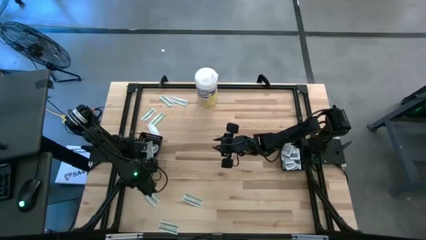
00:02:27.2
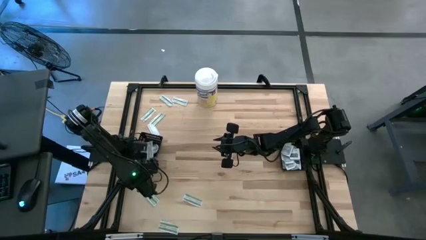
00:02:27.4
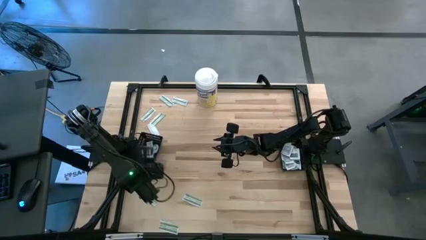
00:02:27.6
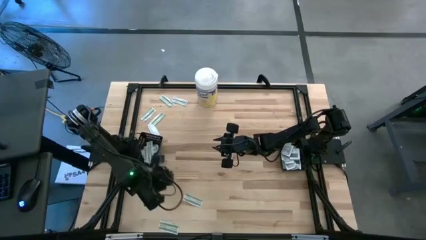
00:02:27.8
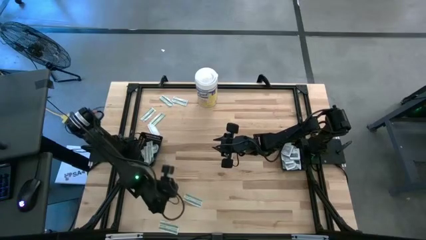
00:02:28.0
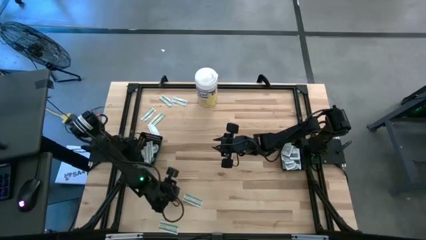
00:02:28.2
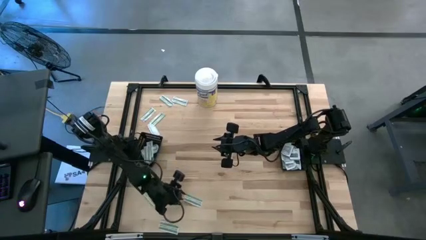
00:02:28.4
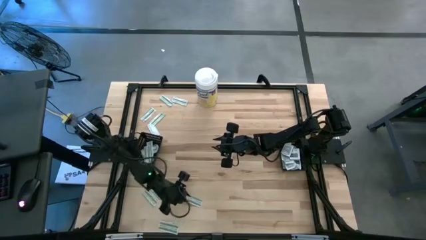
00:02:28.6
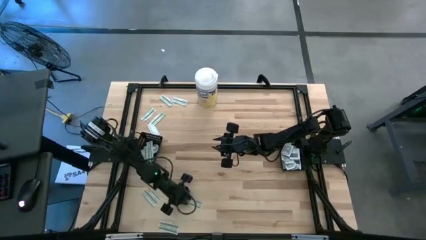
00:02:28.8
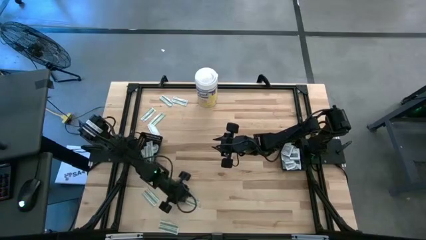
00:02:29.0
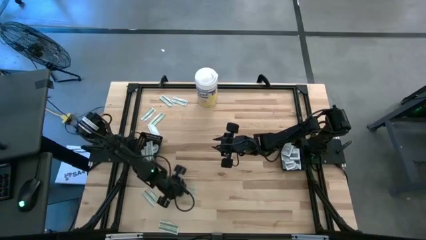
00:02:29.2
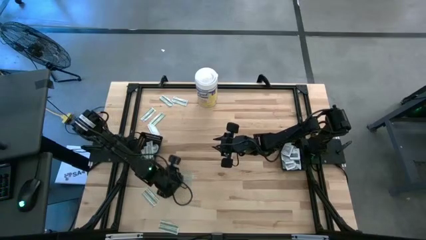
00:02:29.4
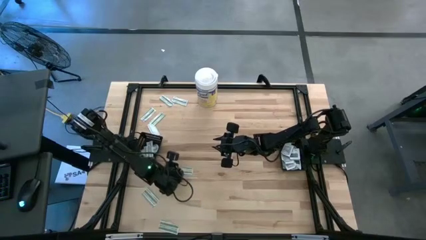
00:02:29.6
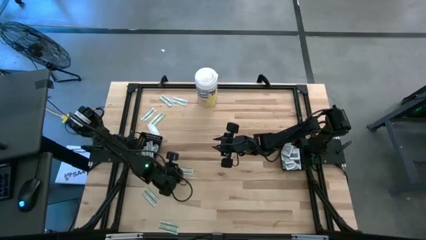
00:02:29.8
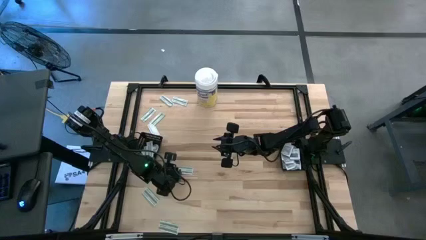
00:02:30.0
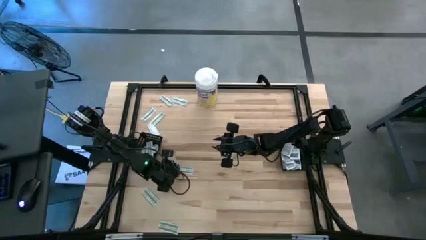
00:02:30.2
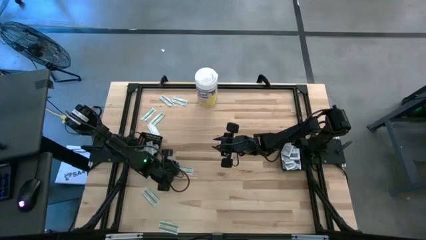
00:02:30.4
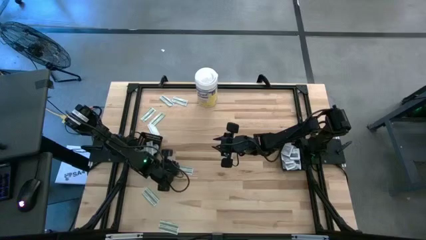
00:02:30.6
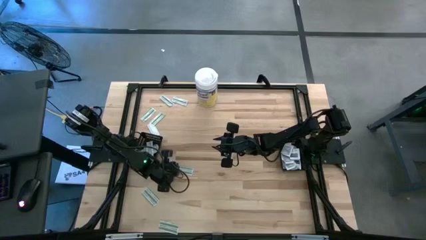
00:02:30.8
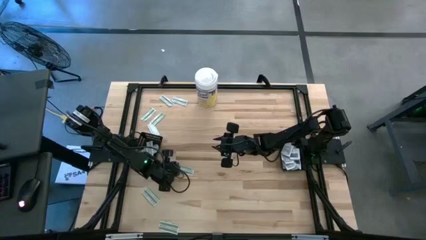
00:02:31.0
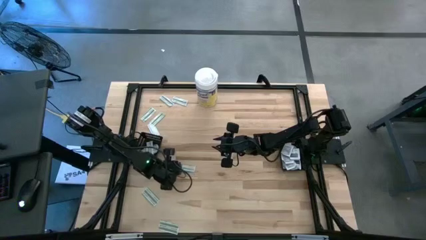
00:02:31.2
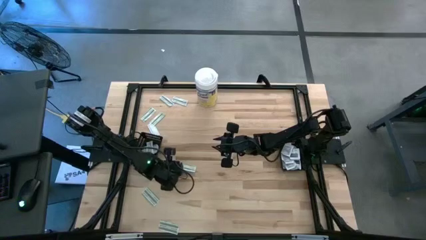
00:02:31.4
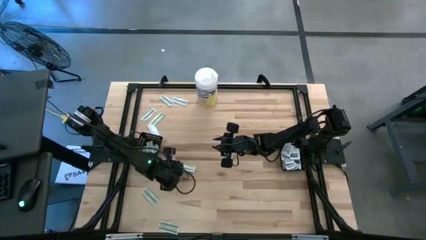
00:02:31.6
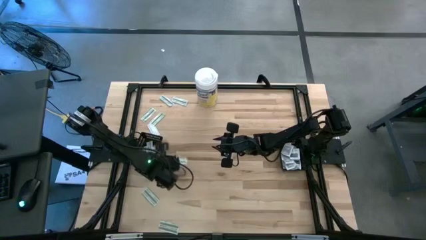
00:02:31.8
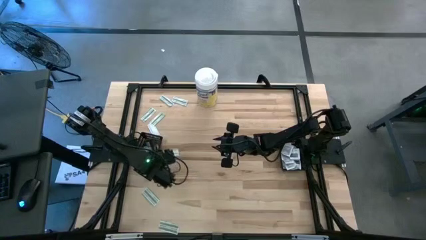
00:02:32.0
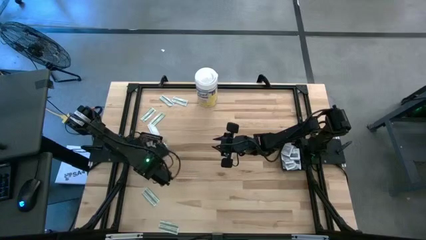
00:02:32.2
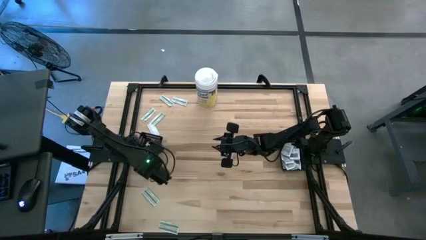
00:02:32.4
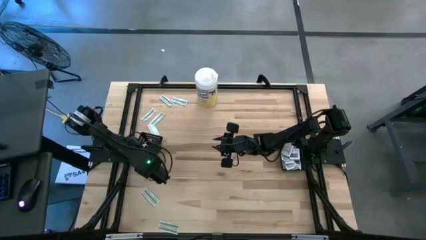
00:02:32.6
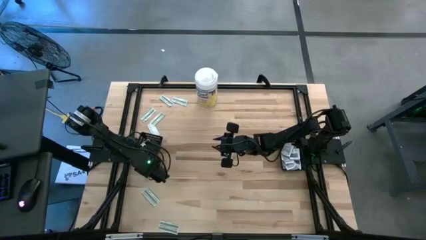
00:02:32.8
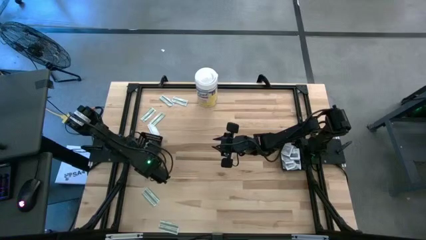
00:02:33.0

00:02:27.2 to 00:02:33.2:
Task: Pick & Place First Aid Supplies
Put the bandage into the left black basket

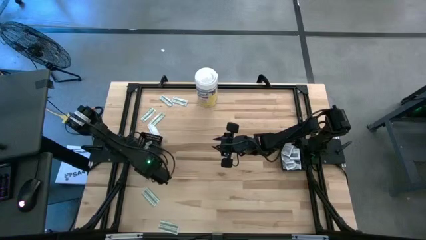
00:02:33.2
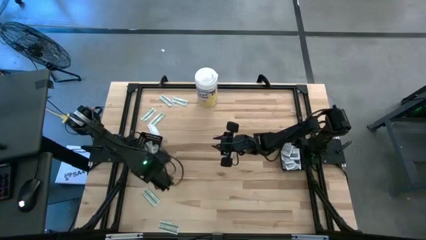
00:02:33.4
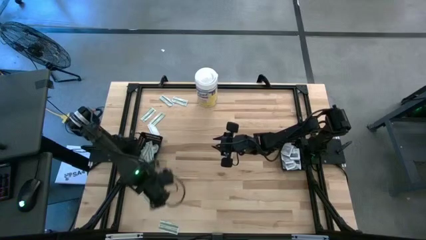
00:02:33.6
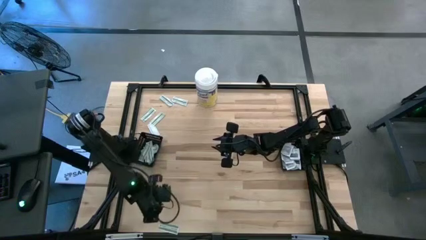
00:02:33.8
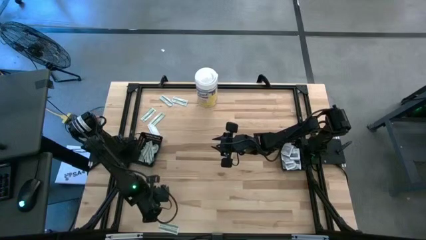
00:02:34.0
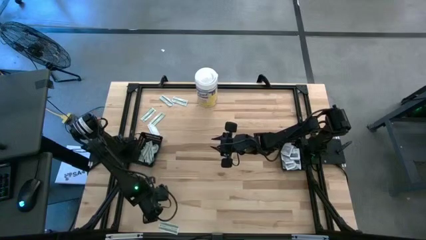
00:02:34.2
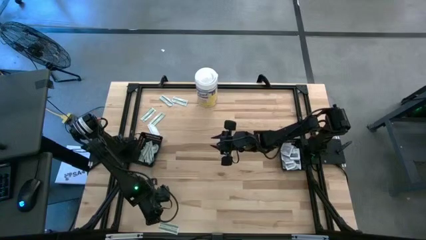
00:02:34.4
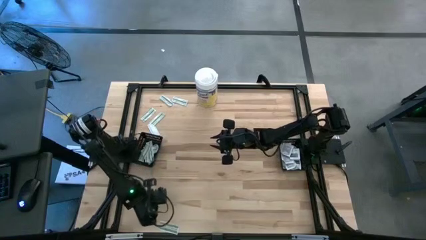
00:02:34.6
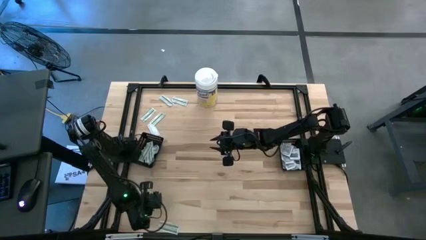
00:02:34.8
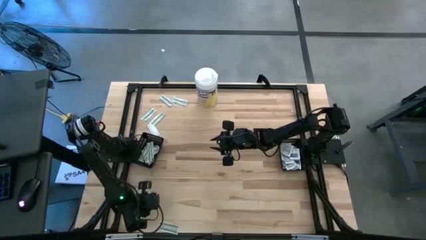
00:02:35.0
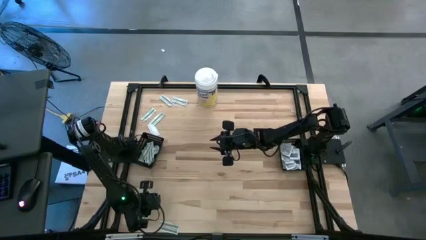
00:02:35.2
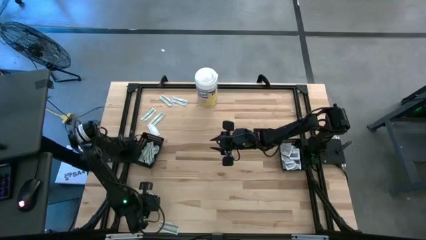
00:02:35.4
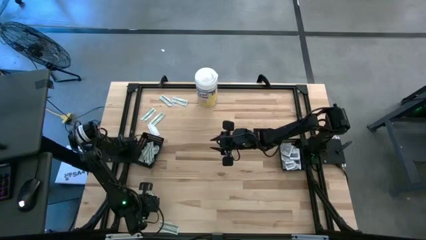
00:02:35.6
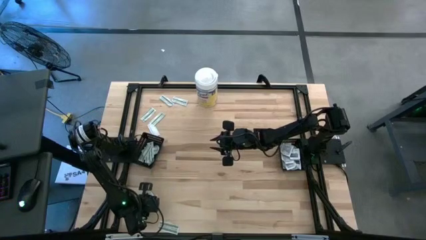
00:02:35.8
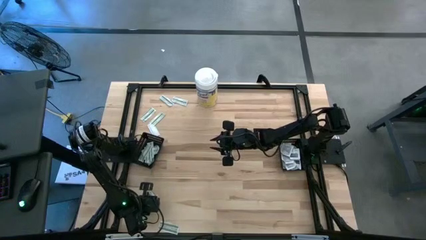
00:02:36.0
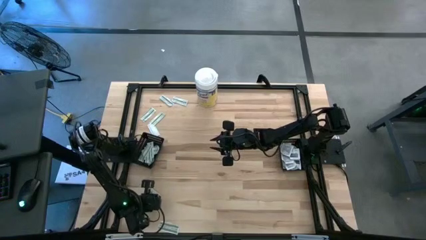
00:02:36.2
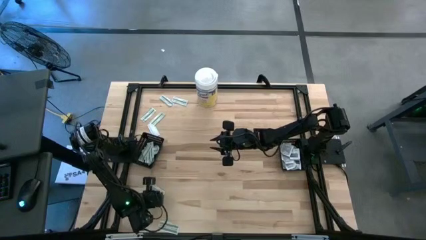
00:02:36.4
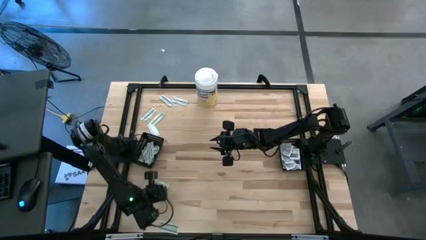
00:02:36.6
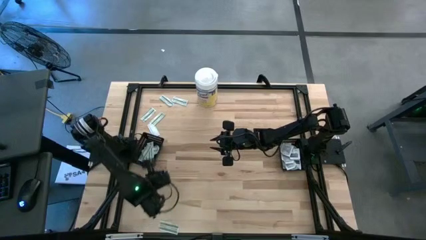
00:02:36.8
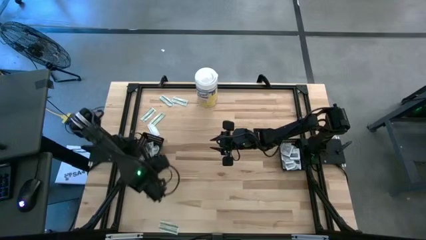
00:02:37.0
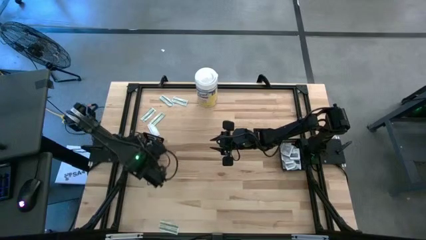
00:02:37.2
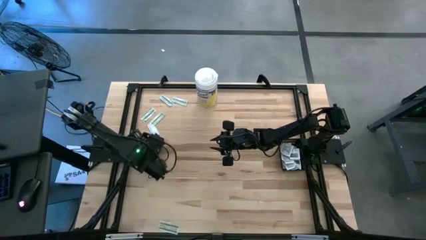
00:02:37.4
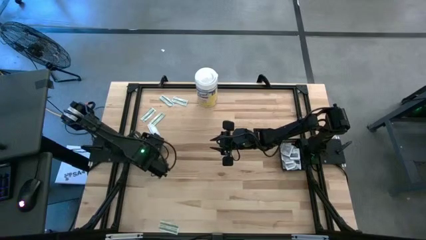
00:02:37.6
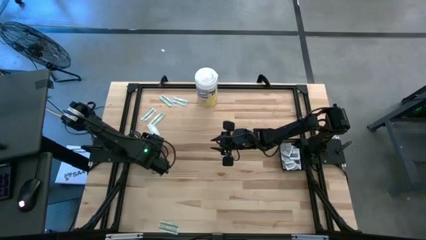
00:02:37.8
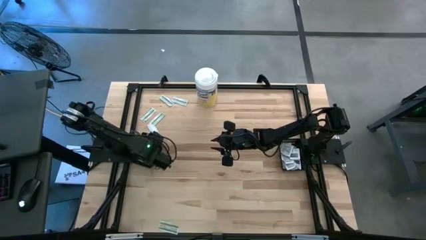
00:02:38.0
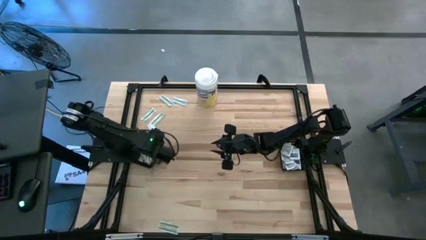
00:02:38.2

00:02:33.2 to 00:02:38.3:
Put the bandage into the left black basket

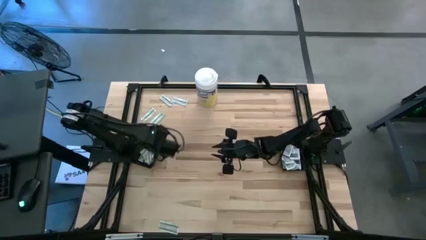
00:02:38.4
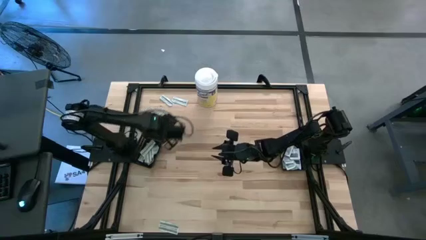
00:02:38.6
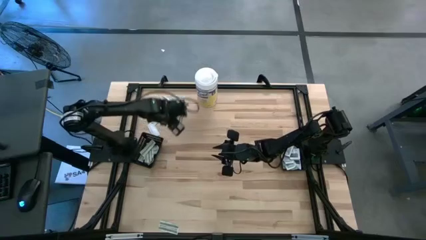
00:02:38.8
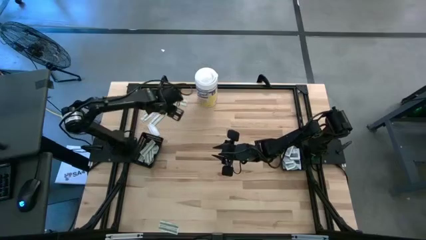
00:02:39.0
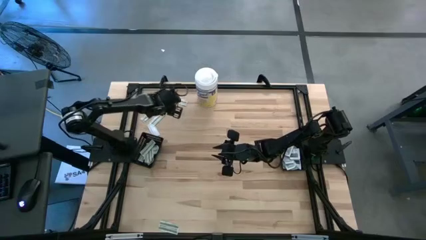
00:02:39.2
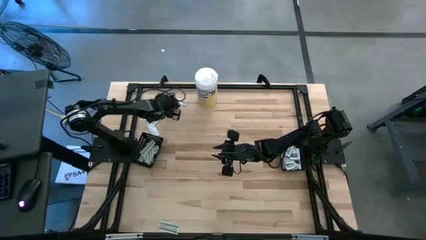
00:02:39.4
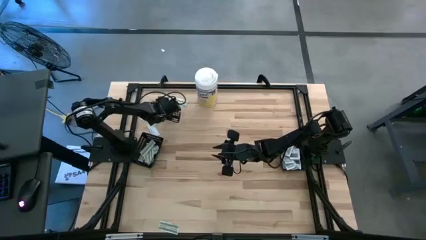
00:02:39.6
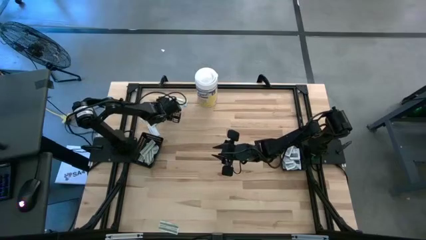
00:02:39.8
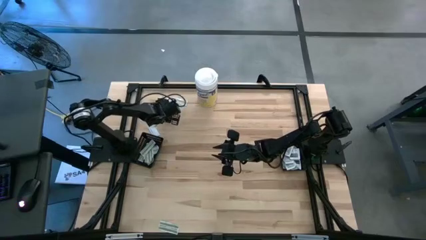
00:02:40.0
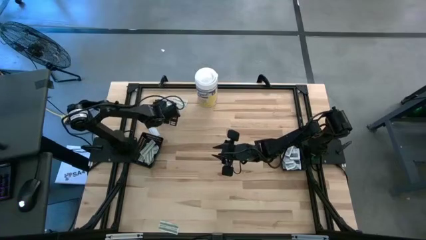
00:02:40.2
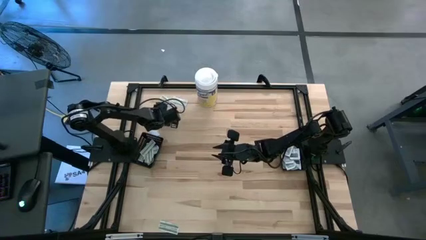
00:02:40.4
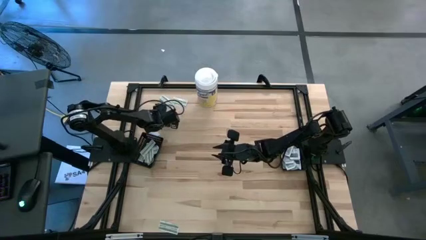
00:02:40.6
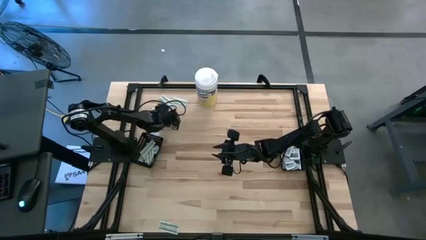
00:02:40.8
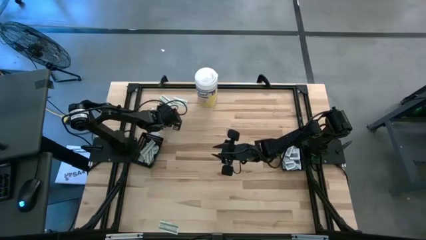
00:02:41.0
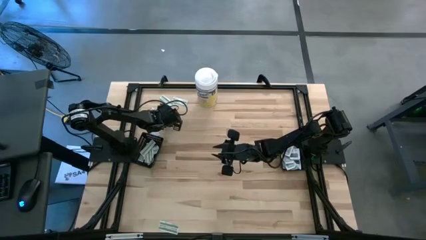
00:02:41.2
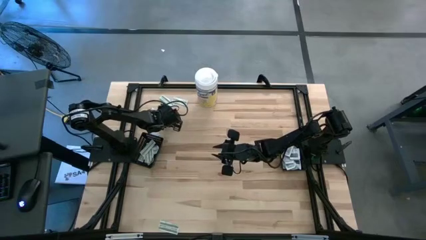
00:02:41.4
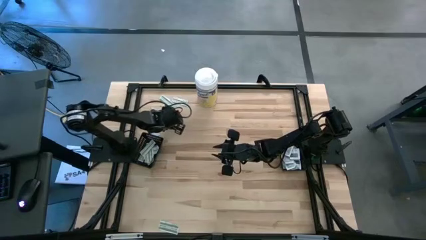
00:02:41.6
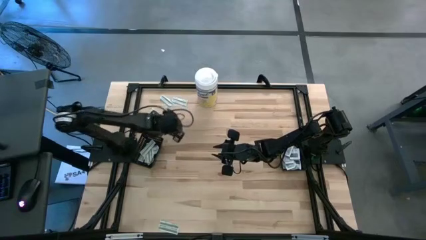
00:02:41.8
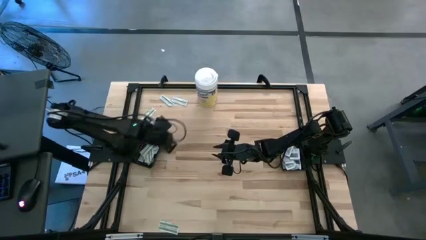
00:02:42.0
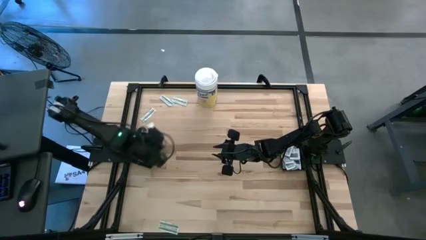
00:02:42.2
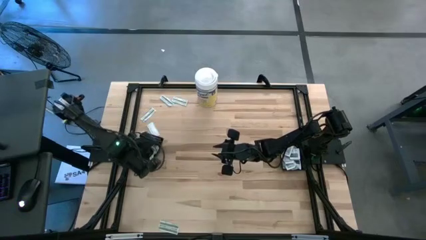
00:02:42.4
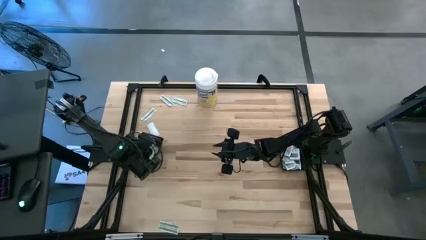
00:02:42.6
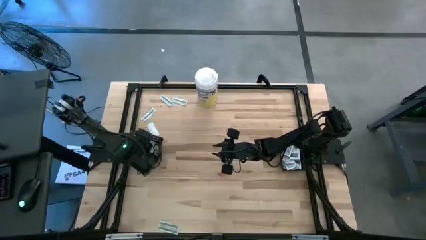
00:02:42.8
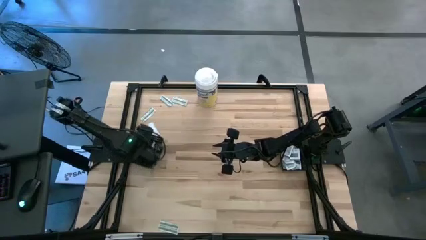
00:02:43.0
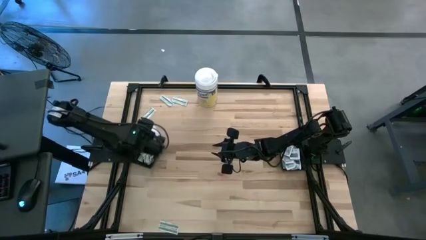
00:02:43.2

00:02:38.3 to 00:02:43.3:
Put the bandage into the left black basket
